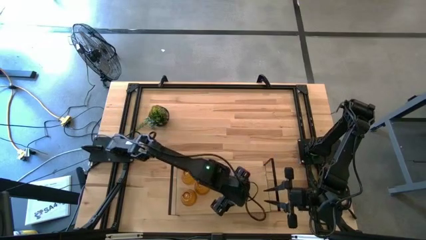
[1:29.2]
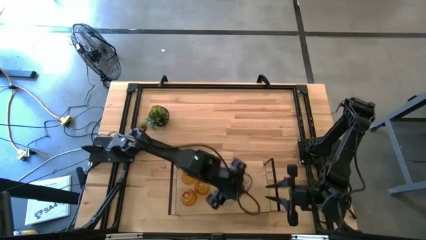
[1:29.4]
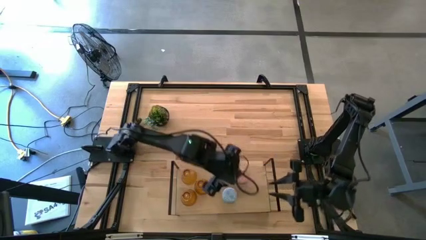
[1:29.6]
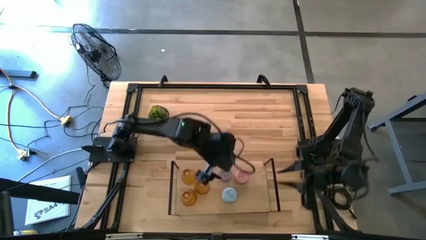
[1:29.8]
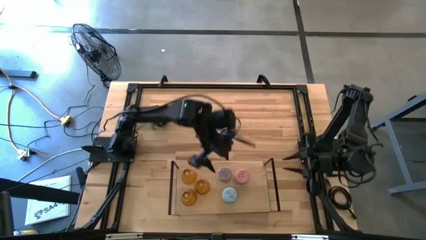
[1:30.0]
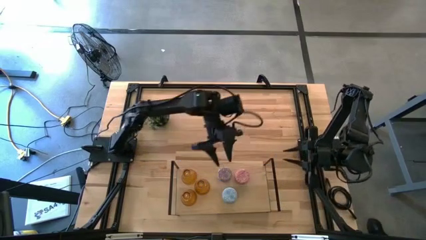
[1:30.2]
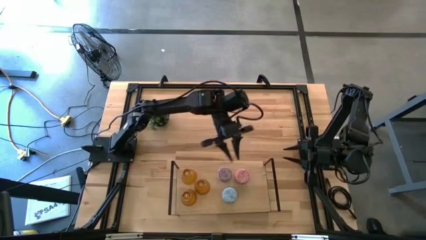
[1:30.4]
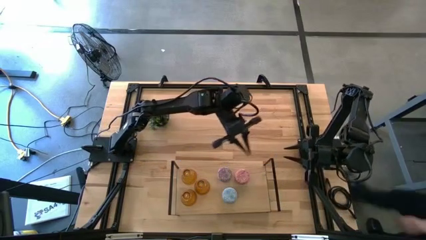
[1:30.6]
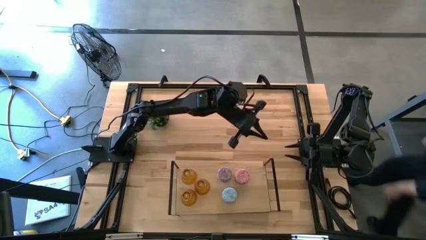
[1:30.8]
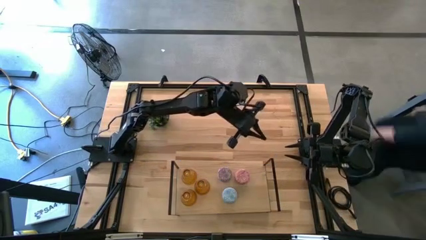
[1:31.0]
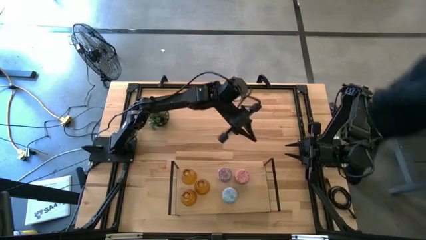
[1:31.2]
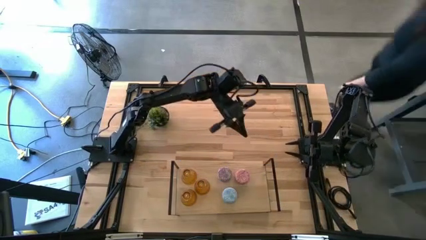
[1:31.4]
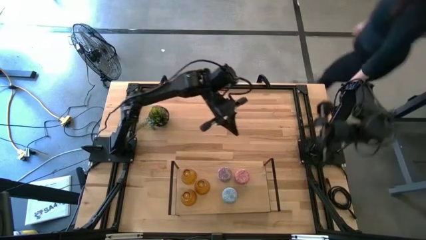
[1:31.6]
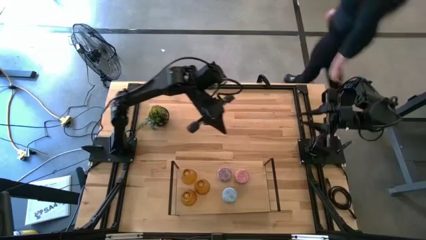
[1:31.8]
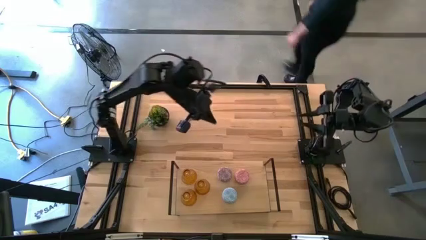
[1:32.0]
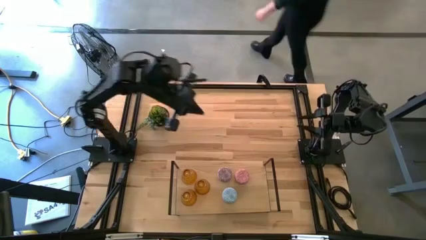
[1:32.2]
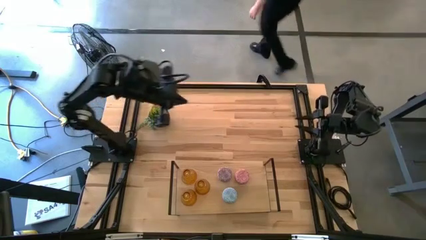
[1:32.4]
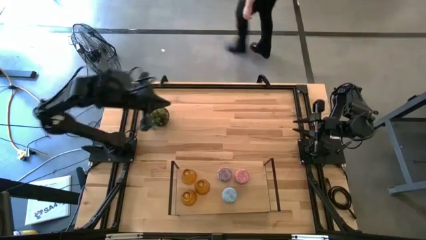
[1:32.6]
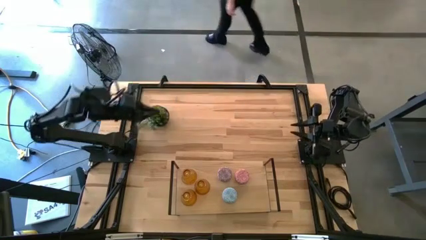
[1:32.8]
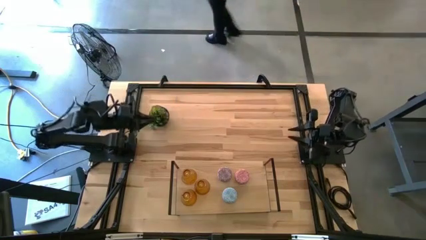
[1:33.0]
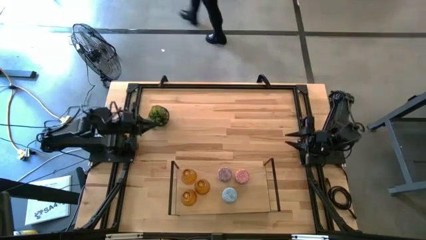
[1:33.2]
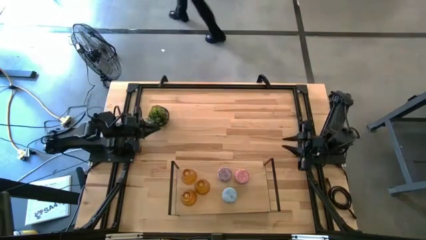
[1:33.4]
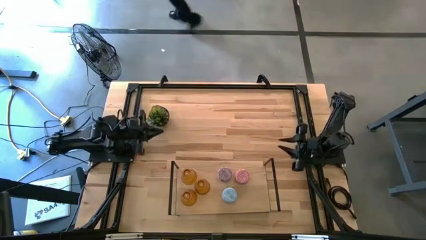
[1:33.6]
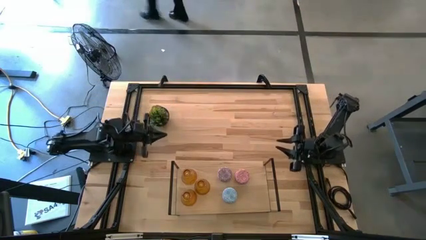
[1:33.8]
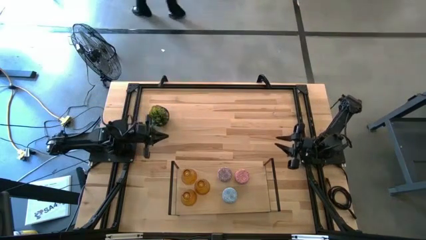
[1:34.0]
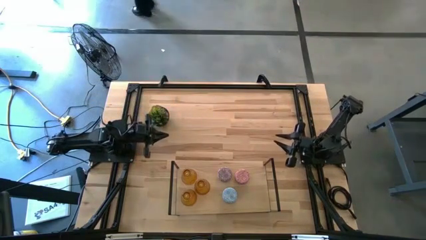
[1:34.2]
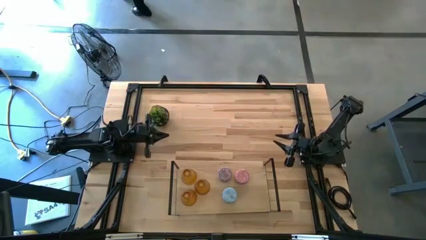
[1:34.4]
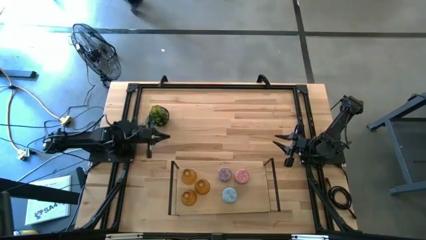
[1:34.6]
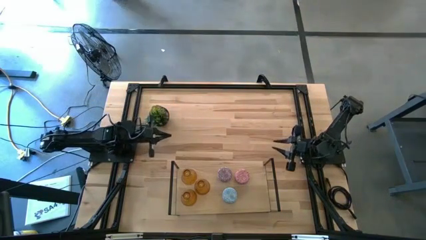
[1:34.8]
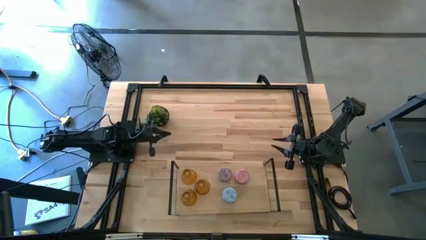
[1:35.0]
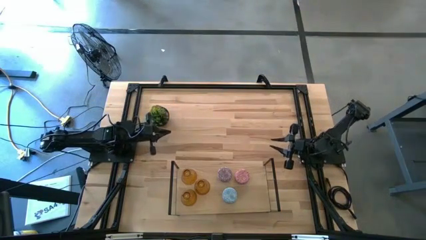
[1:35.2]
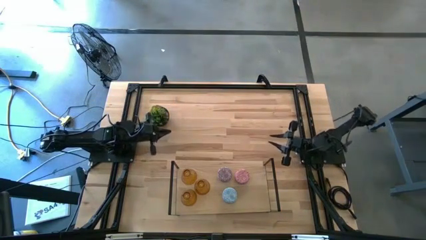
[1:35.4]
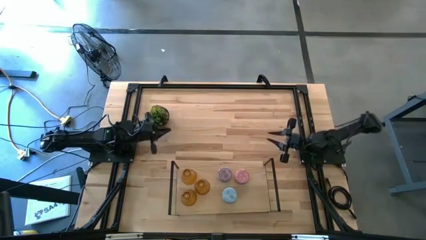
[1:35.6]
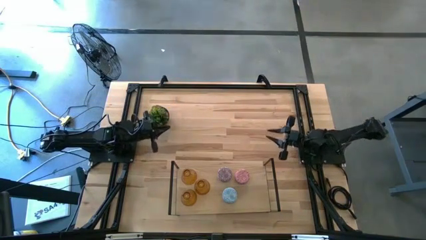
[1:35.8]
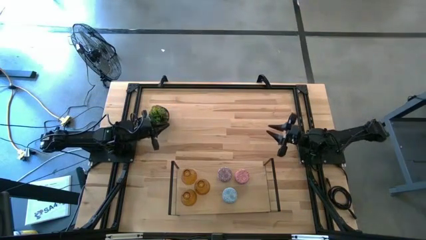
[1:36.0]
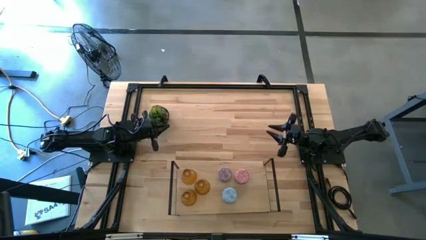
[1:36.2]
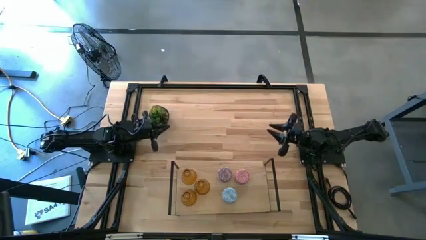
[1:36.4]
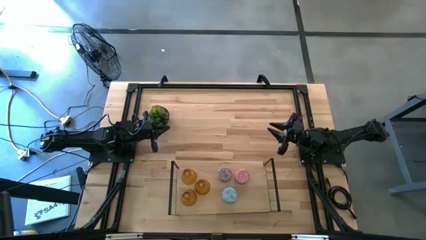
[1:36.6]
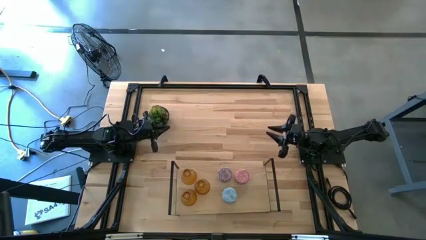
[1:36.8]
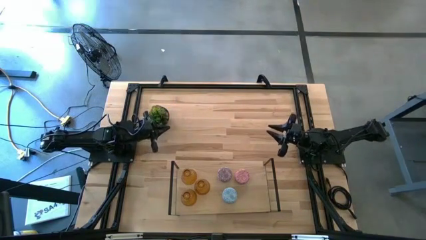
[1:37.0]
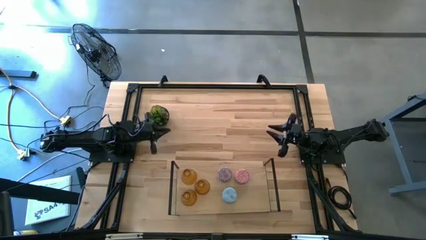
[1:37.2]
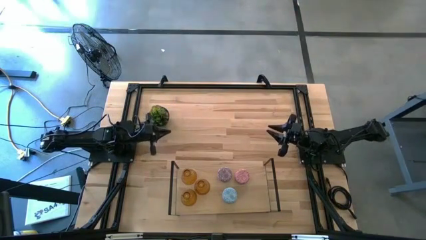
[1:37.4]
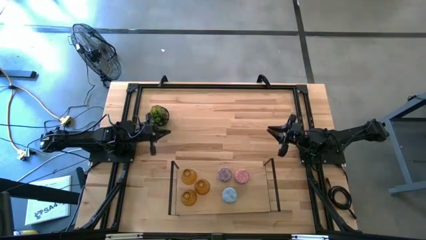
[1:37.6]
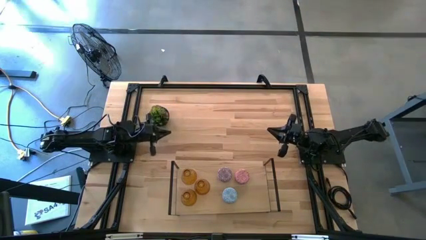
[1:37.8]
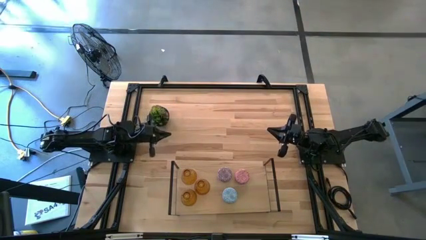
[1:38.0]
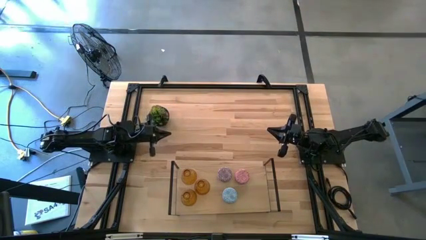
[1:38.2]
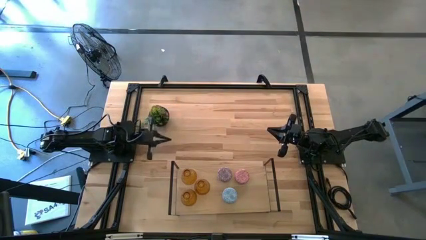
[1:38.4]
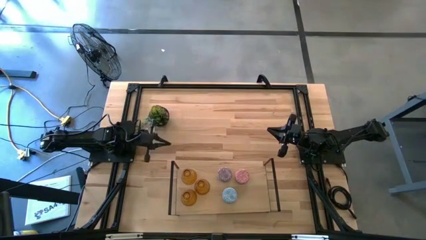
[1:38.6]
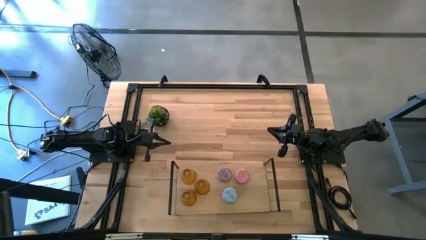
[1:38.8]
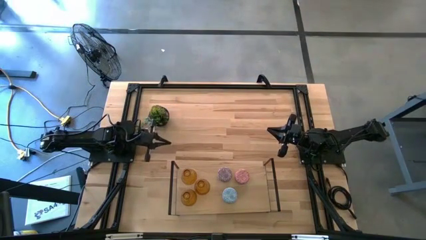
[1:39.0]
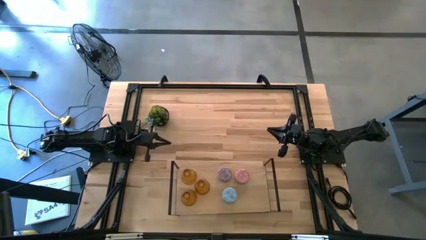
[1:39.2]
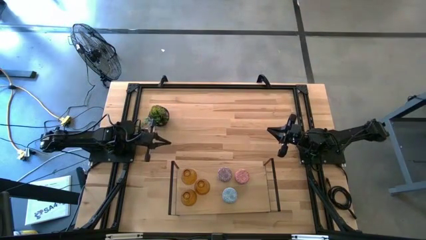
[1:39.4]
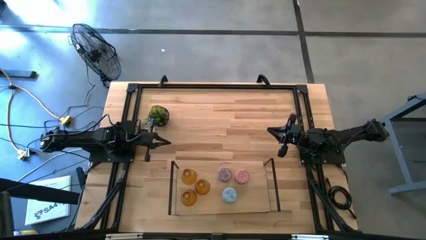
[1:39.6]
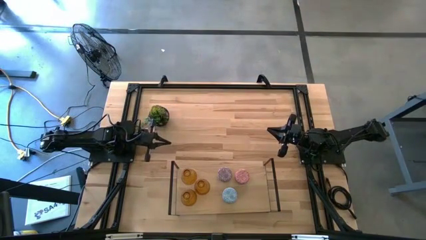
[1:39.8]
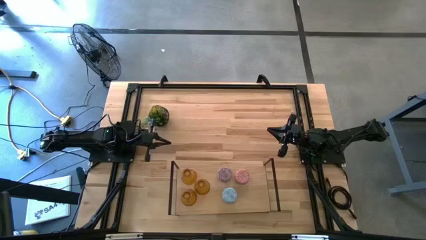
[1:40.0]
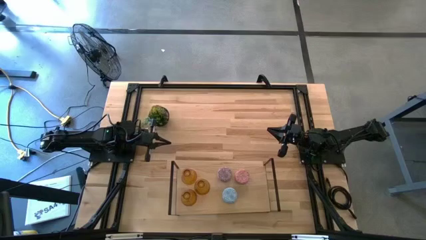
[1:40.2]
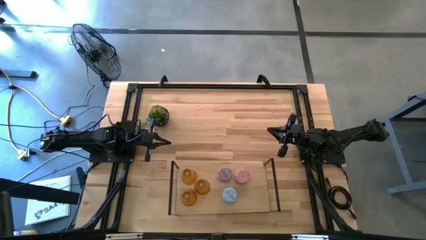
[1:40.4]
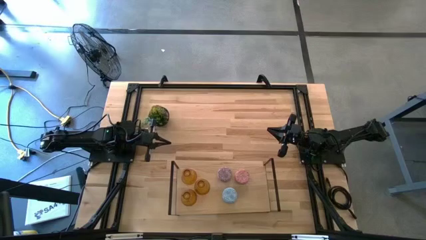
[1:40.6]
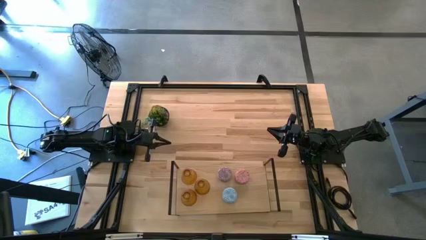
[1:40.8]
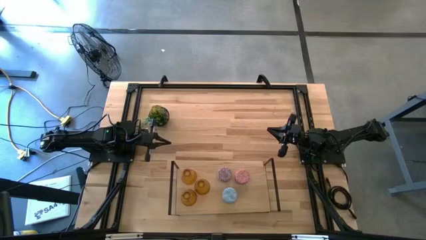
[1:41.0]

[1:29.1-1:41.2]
Task: Pick & Place candle stick holders
Return to Home Position

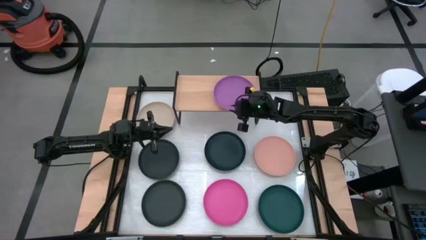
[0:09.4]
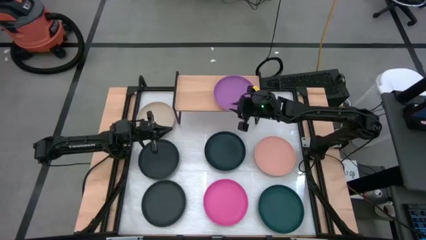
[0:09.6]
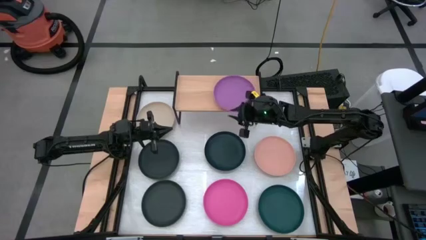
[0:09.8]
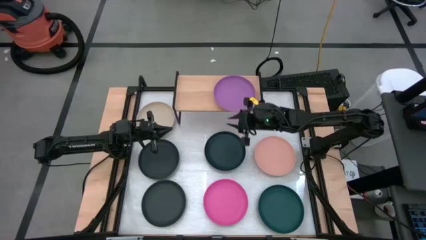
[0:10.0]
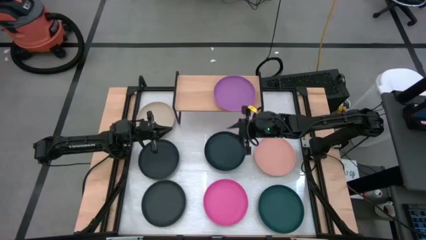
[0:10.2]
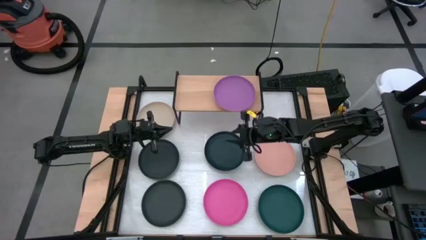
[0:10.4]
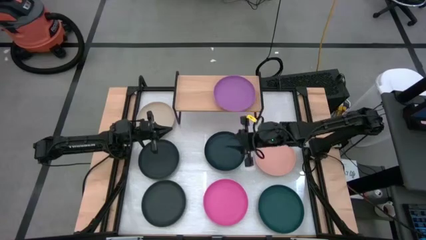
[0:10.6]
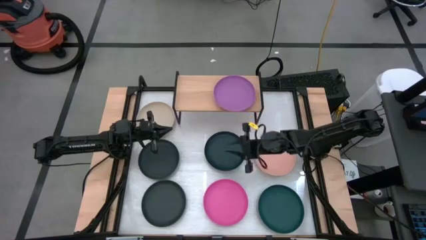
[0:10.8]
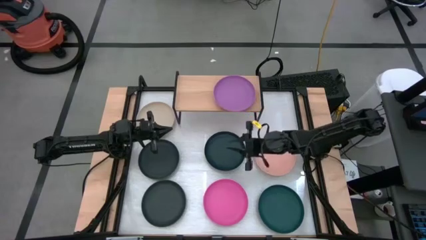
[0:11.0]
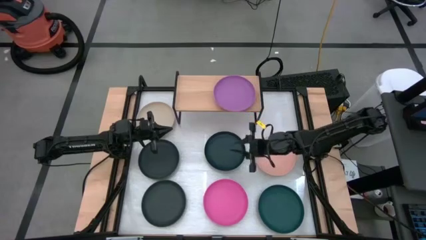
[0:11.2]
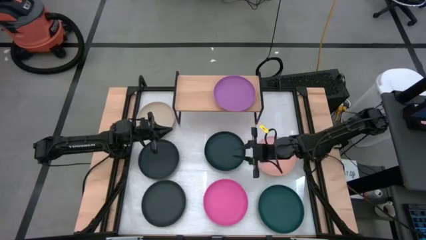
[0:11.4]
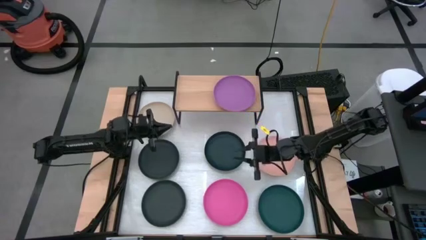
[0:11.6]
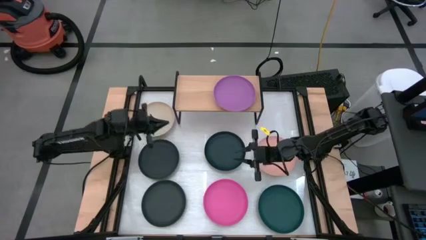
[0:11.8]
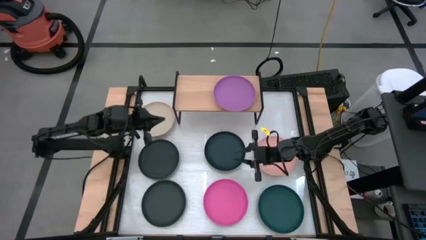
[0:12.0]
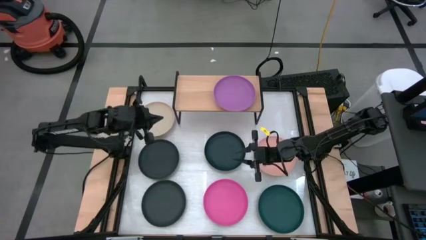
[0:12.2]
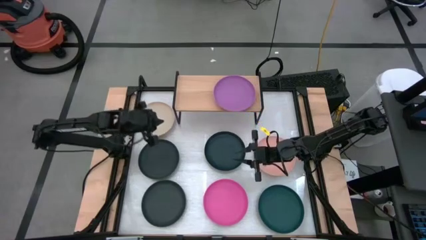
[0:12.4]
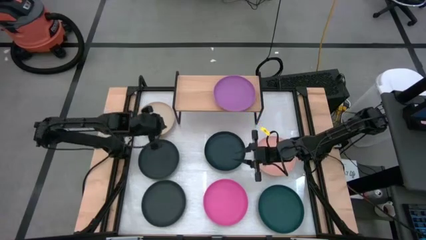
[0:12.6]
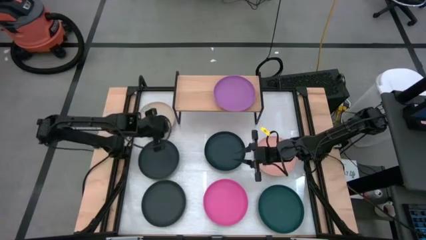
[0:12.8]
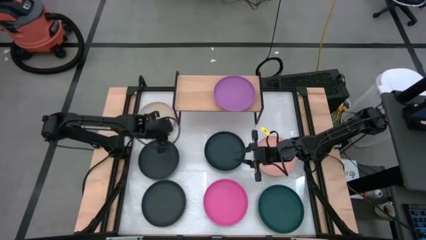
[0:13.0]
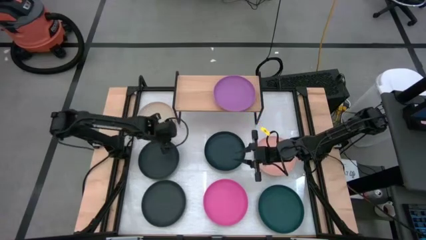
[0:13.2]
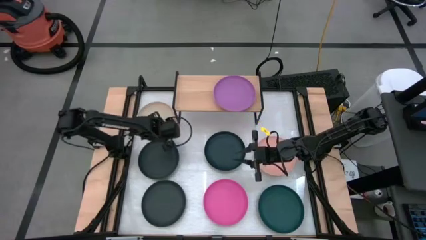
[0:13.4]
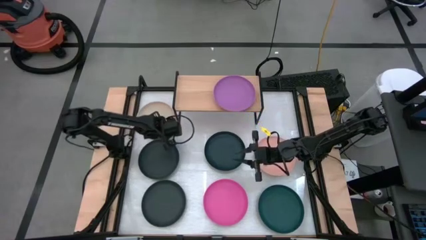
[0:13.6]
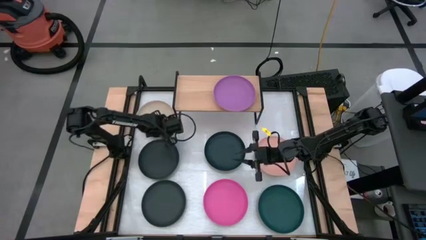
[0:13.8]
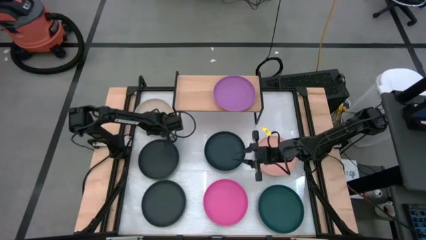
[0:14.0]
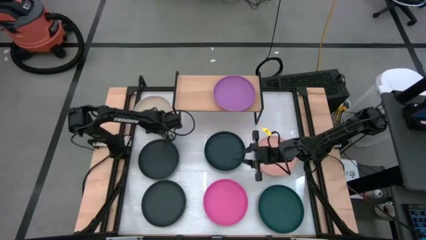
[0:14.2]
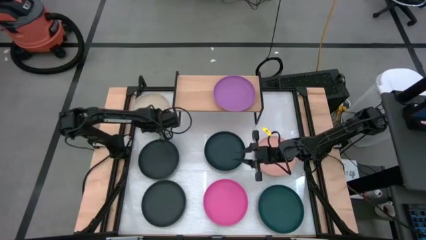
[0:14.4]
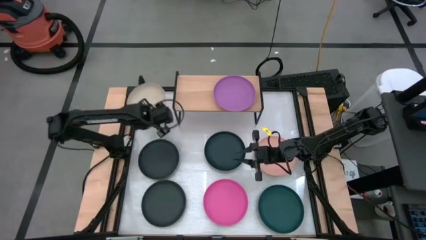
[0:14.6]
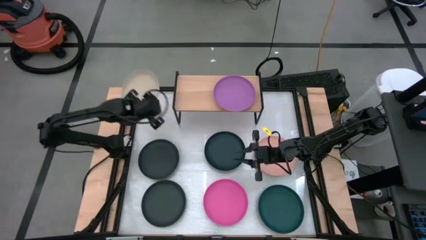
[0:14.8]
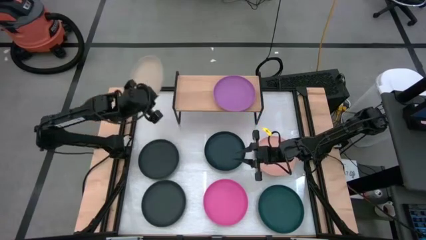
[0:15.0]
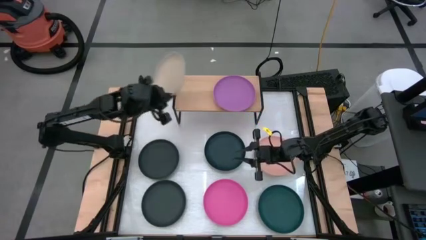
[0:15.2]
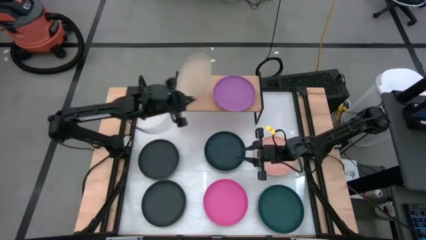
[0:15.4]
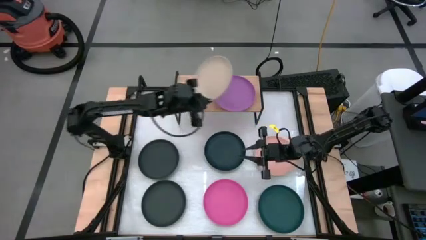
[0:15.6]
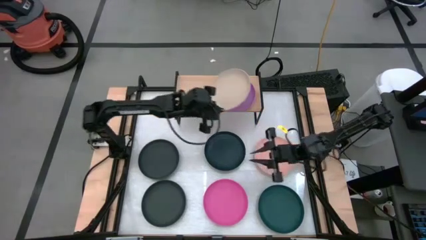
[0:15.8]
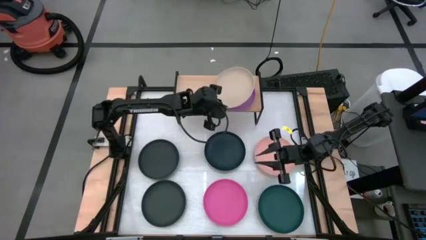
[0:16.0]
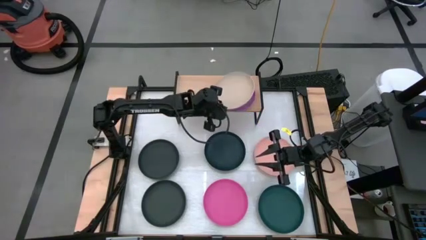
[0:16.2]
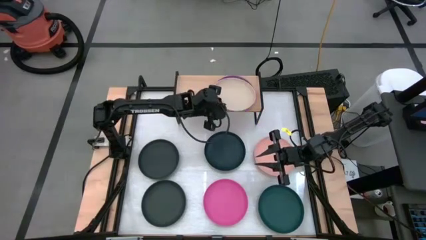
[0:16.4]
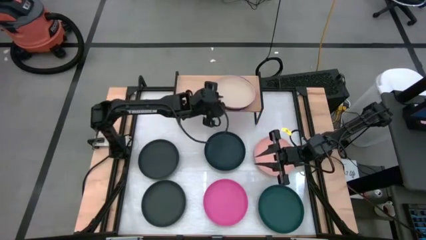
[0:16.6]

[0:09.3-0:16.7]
Task: Place and stack plates onto a shelf
Stack the light brown plate on top of the purple plate on top of the shelf
